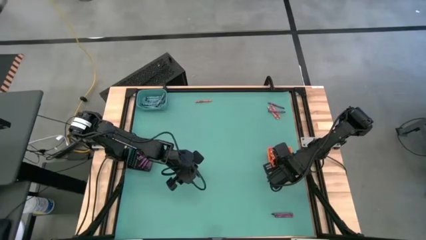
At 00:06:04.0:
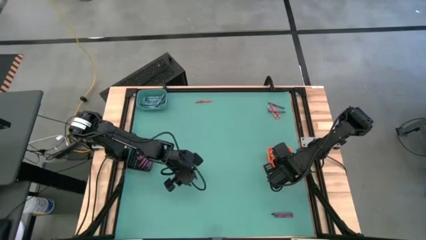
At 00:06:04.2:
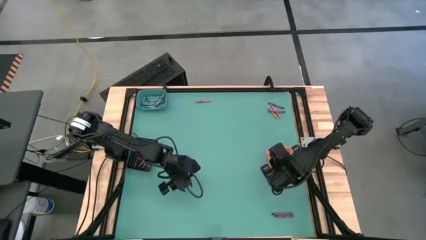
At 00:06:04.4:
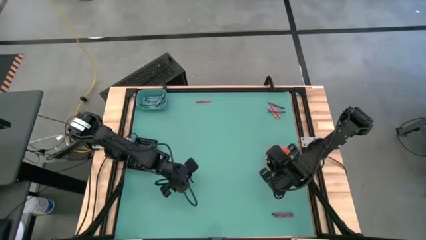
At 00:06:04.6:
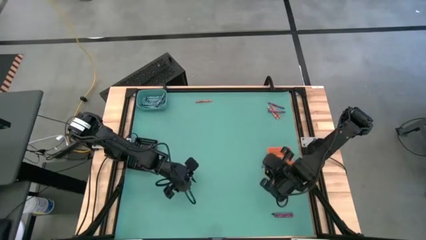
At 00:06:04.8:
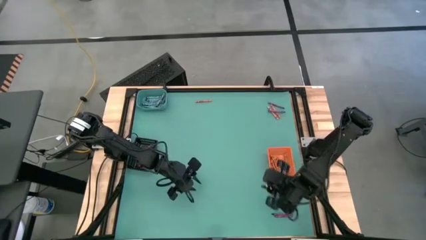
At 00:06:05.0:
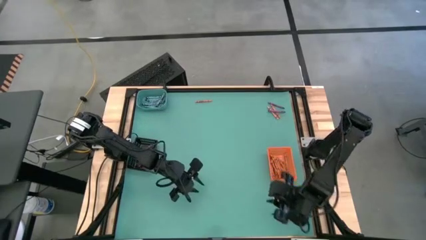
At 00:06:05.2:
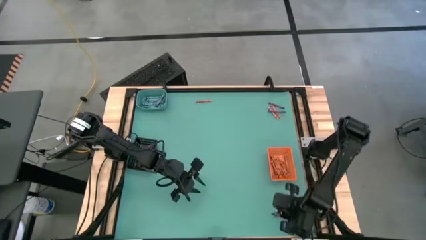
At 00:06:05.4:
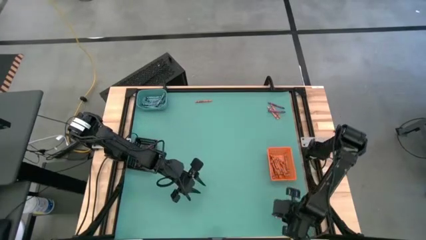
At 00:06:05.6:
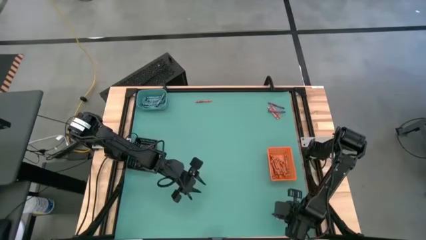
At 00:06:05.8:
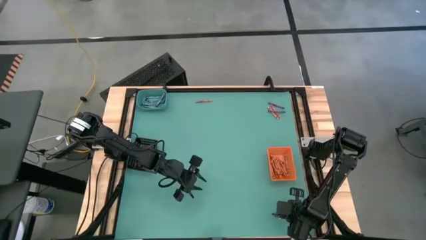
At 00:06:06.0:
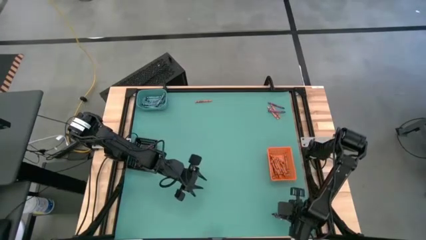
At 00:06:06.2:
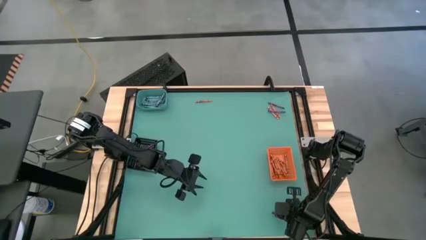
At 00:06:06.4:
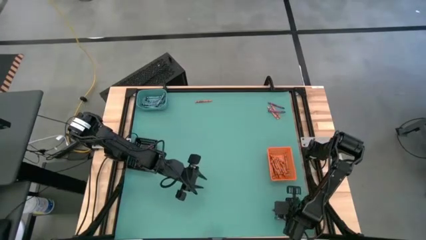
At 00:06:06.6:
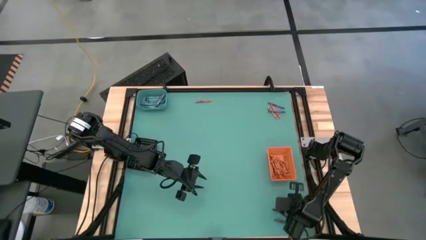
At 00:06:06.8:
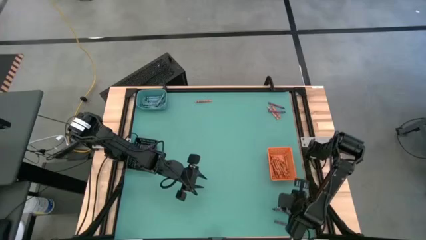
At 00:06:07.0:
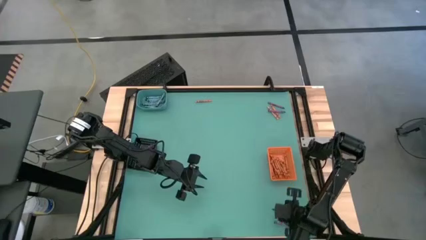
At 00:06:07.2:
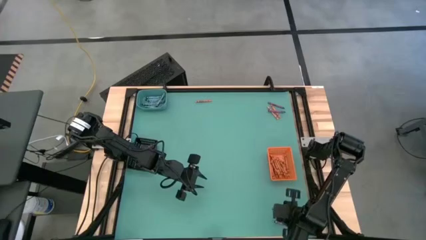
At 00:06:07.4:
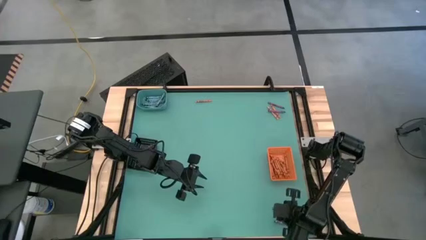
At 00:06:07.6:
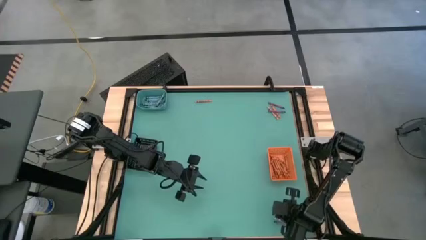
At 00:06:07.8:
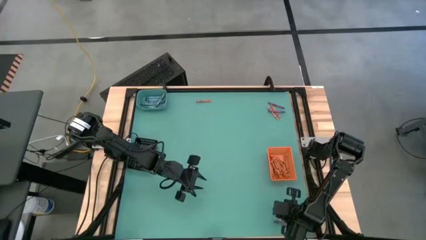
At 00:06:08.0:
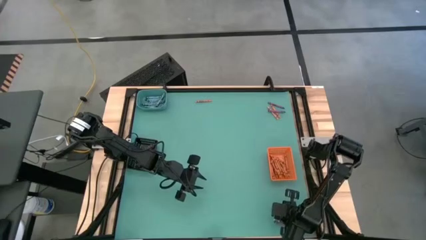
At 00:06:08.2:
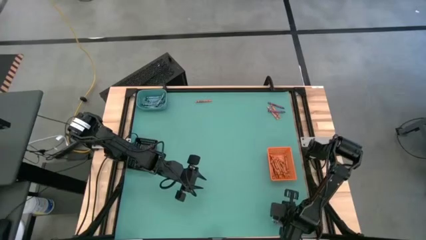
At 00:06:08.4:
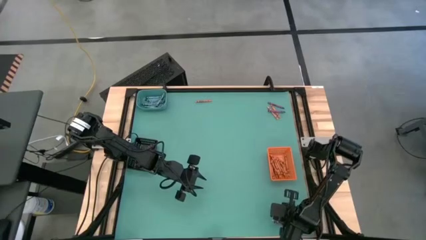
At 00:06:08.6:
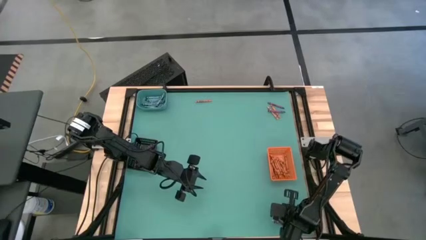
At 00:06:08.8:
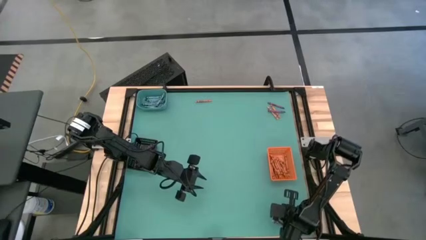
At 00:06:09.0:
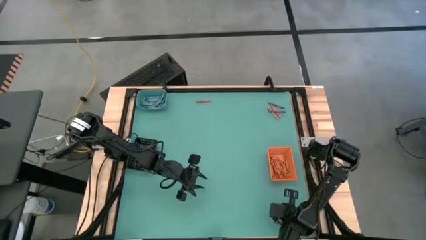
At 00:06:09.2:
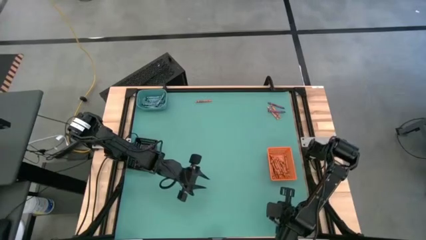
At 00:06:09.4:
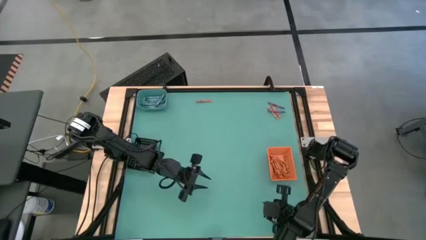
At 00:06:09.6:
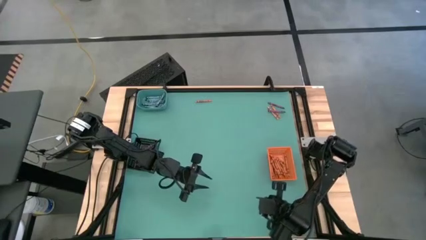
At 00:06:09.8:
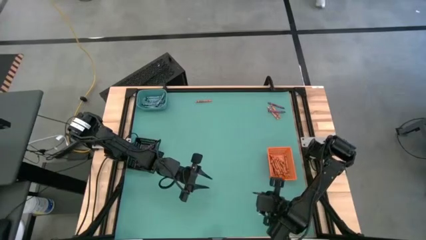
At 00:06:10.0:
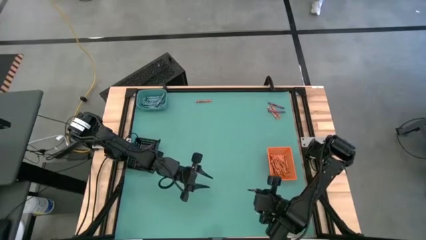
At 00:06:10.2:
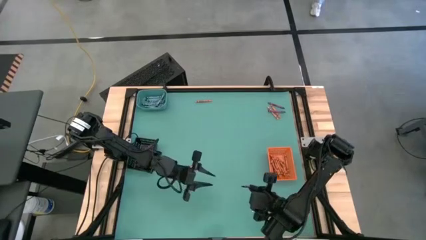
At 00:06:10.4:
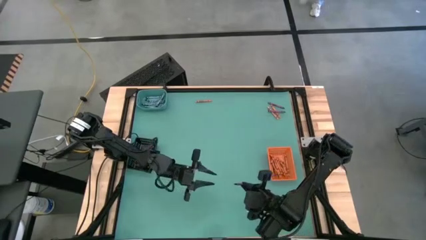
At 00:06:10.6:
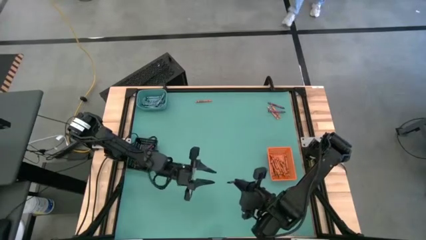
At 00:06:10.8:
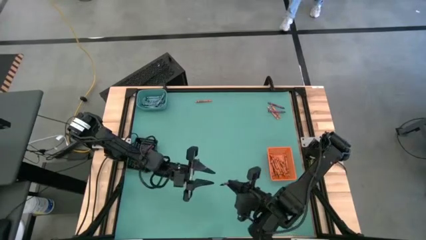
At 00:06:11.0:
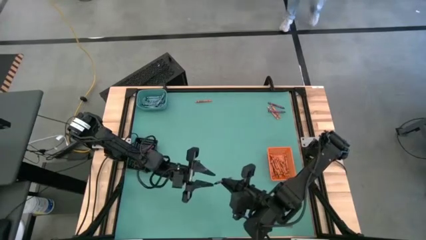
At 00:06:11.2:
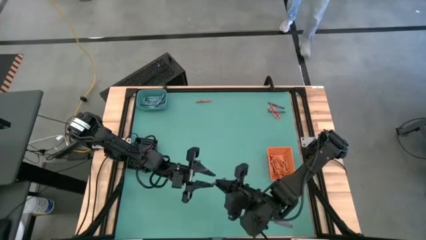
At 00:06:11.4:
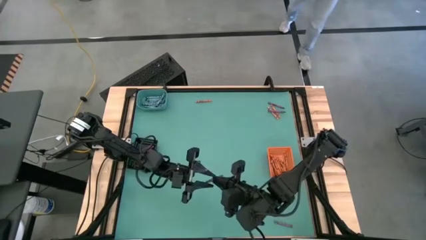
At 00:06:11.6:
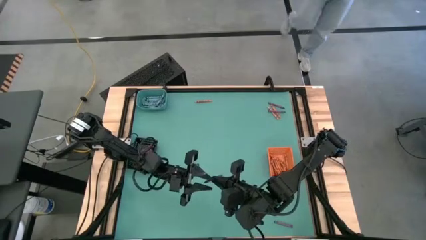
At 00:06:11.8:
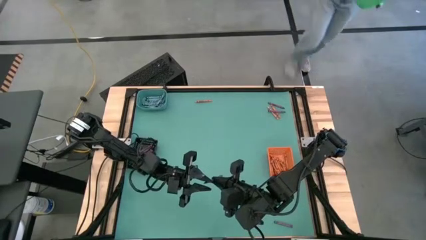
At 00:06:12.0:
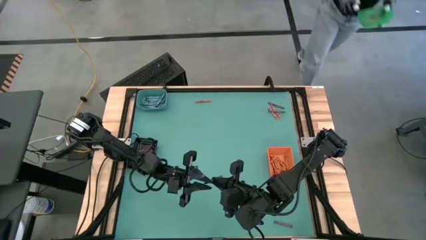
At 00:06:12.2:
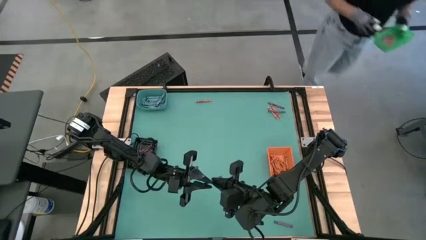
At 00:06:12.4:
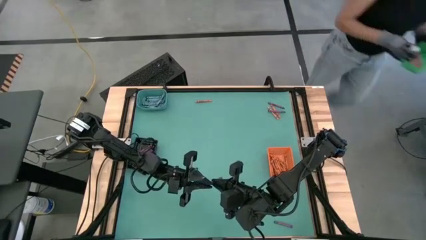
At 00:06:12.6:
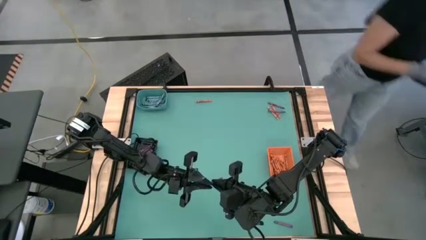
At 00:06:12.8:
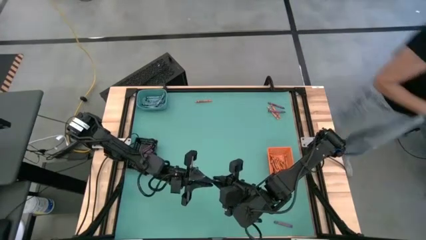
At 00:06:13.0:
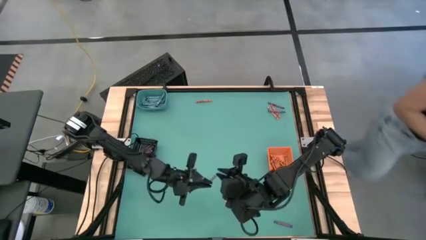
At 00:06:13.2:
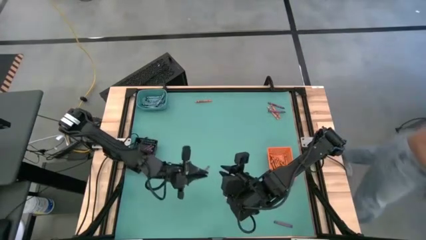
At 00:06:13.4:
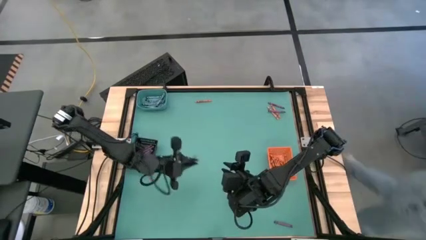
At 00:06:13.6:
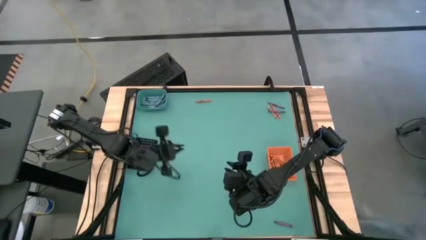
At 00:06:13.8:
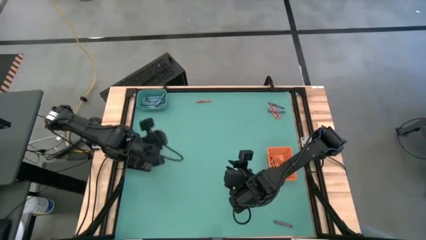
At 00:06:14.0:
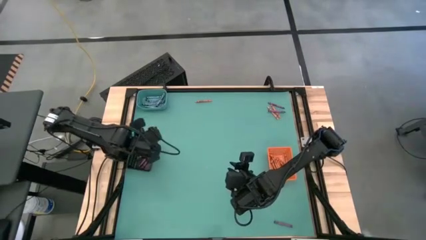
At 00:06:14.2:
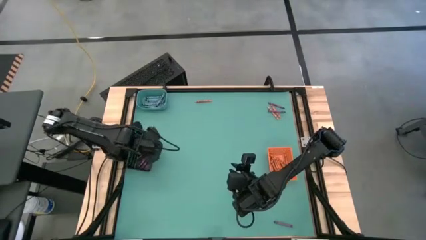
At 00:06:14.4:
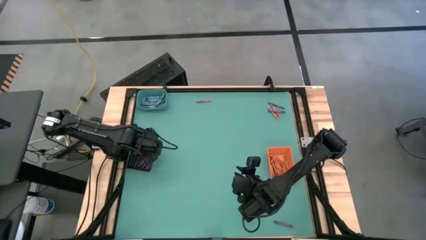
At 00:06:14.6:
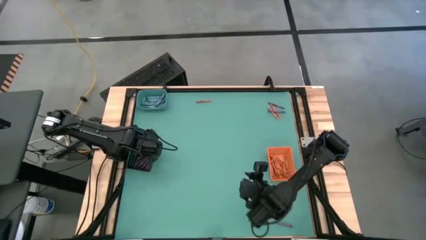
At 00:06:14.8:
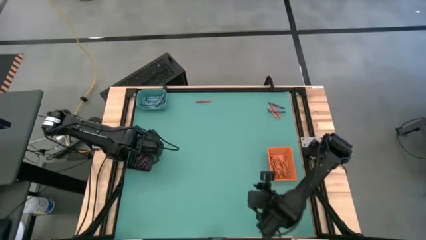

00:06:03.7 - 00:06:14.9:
Task: Sort crayons
Put the purple crayon into the black bin

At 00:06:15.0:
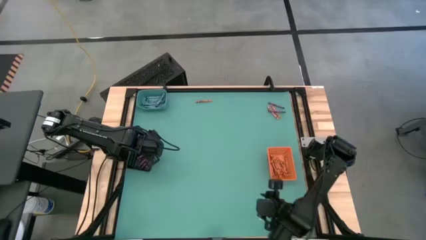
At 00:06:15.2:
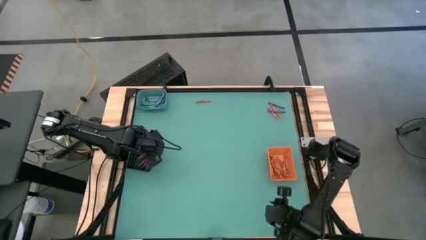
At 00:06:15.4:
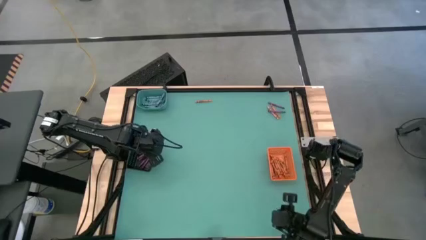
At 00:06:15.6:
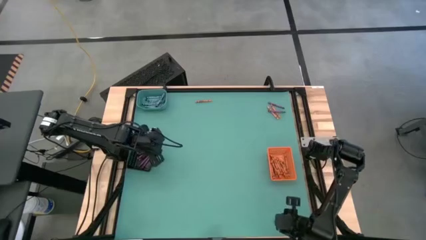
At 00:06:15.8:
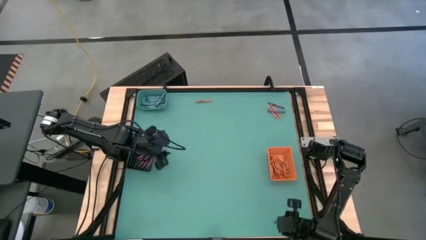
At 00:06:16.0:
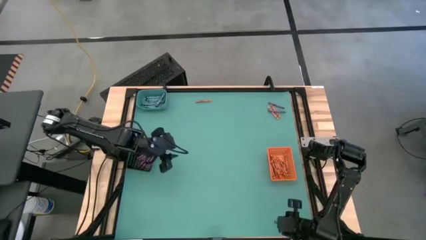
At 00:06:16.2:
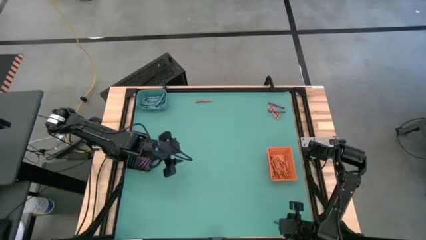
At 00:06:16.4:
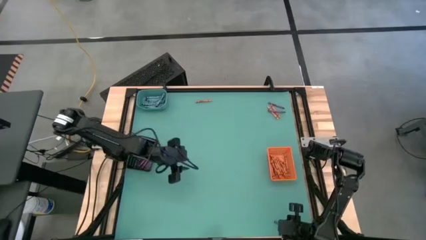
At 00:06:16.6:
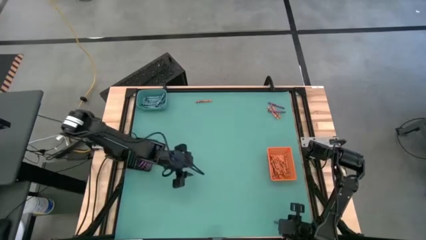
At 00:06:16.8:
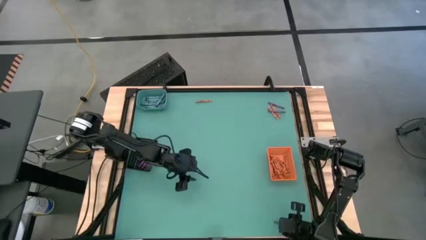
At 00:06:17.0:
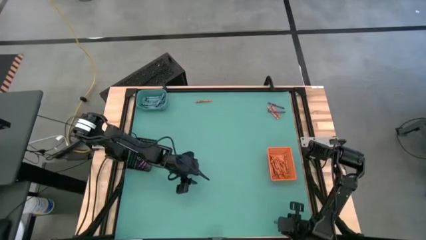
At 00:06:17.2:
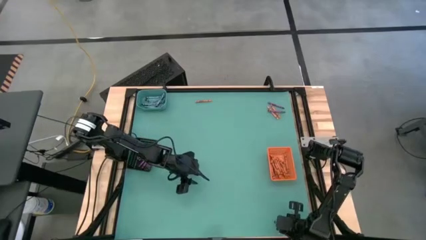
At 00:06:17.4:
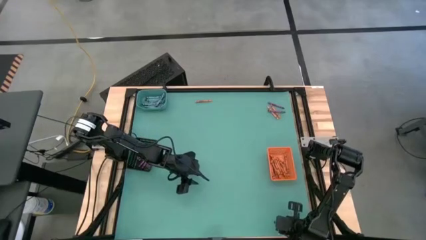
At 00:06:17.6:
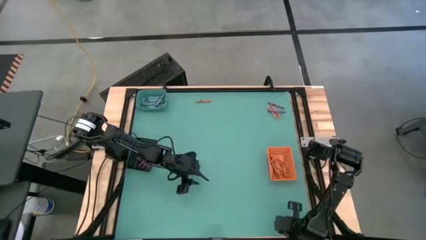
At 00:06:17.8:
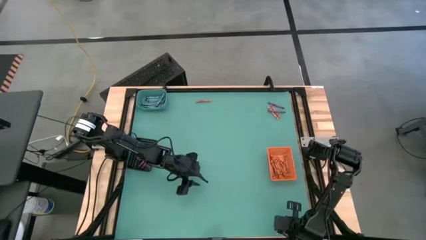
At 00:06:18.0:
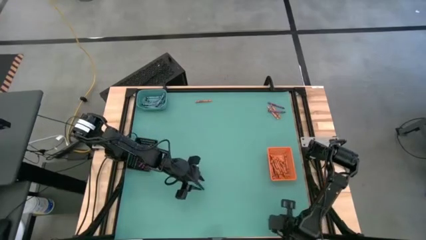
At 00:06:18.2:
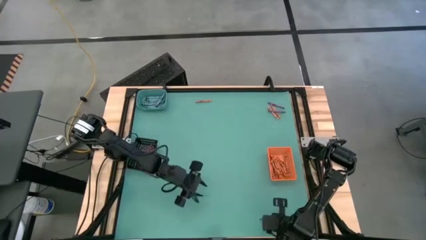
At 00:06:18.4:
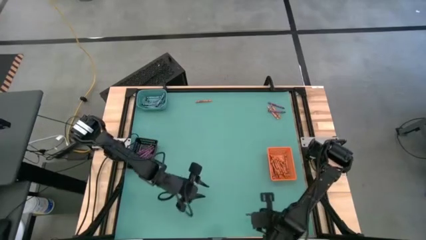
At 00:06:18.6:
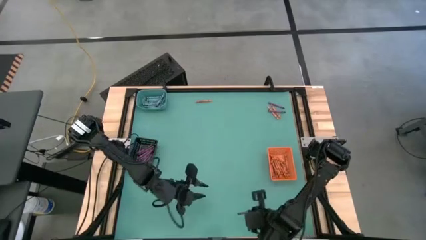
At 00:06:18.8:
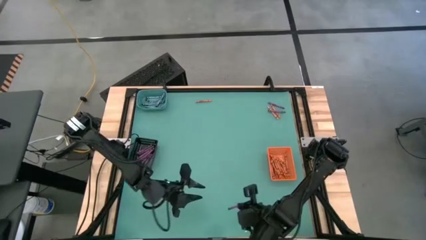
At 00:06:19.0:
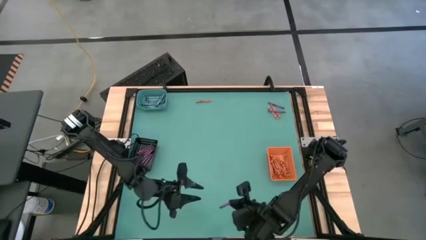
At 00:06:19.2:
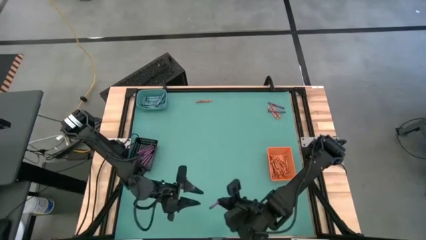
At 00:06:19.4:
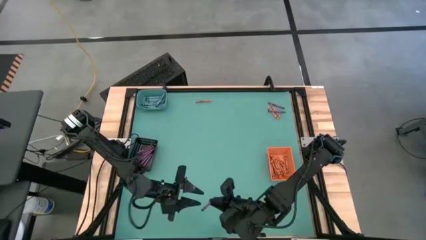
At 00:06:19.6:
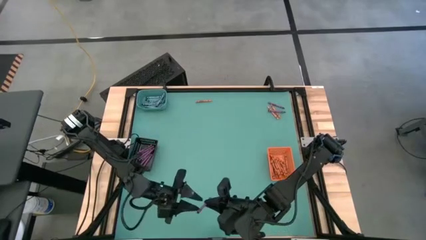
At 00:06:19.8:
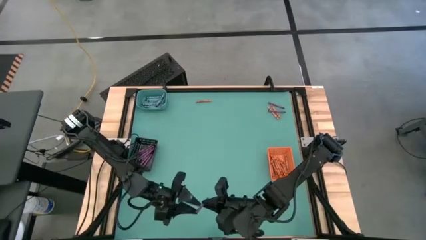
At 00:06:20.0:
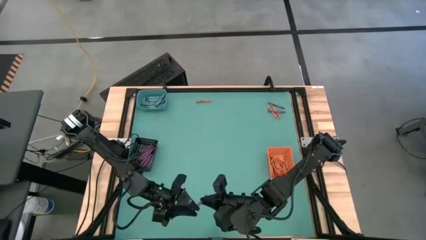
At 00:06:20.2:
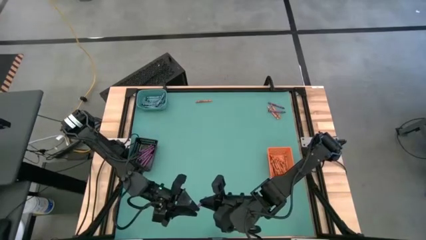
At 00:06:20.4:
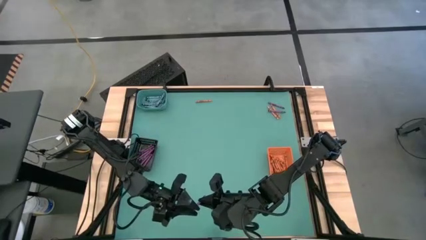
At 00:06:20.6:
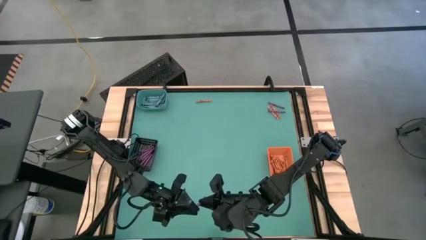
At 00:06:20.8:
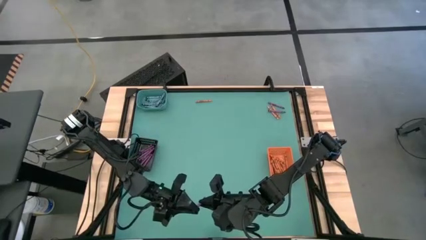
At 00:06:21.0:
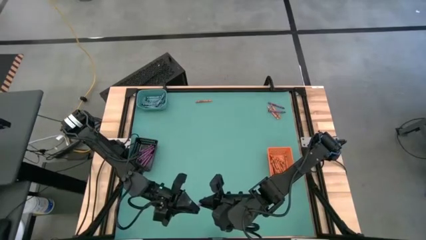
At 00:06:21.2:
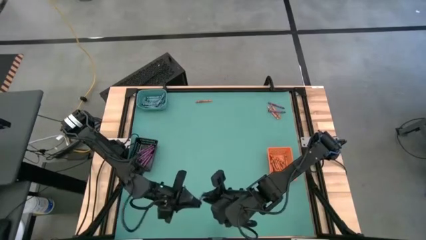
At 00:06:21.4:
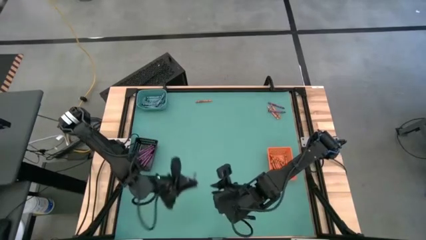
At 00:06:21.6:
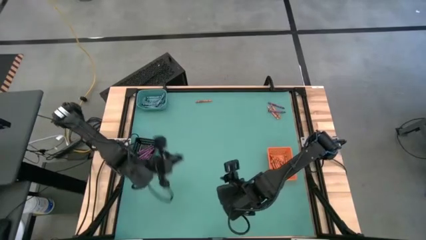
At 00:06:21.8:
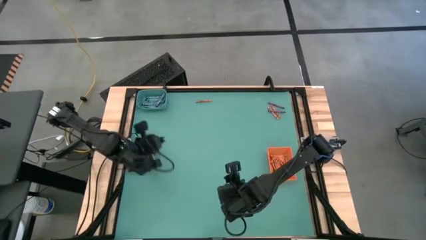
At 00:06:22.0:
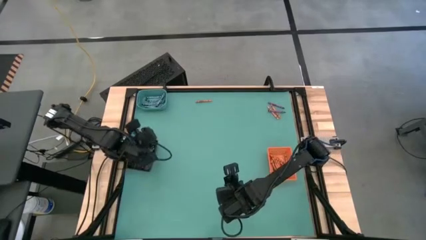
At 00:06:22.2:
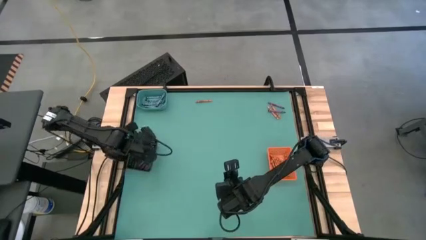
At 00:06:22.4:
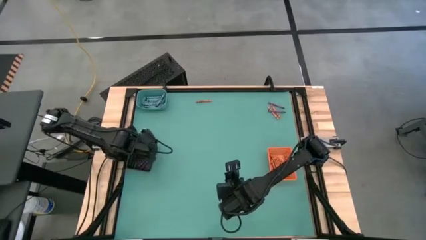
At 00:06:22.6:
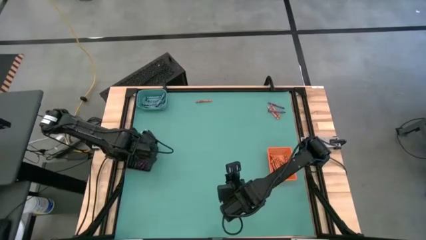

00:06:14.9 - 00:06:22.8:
Put the purple crayon into the black bin
